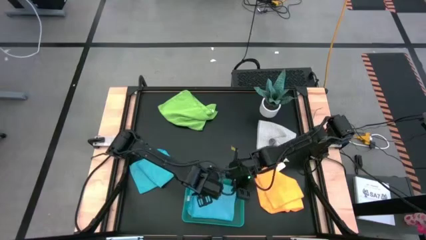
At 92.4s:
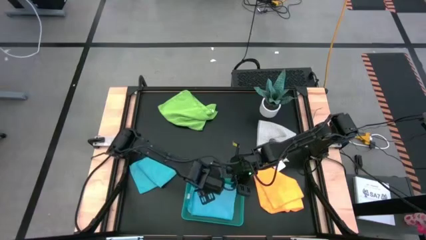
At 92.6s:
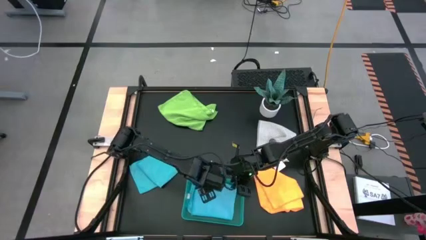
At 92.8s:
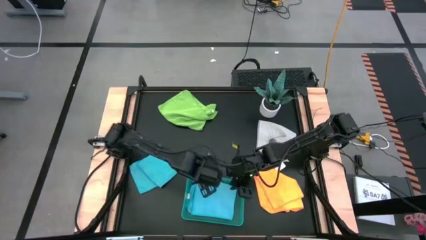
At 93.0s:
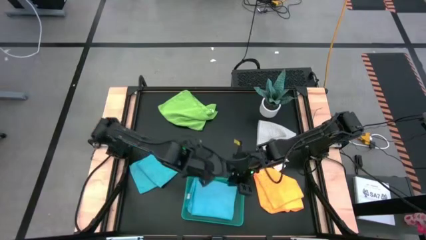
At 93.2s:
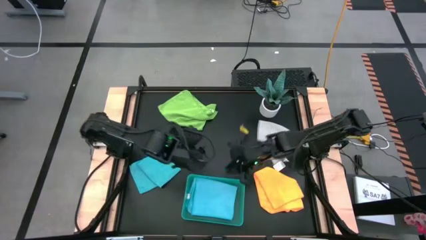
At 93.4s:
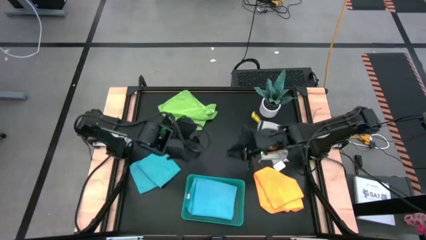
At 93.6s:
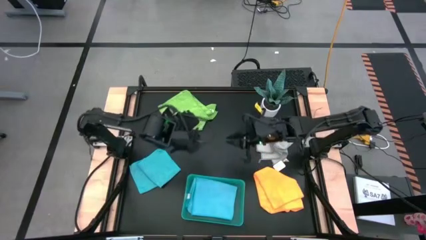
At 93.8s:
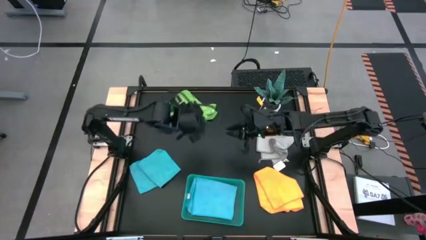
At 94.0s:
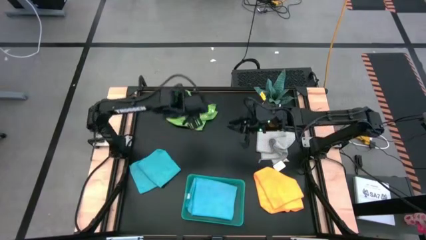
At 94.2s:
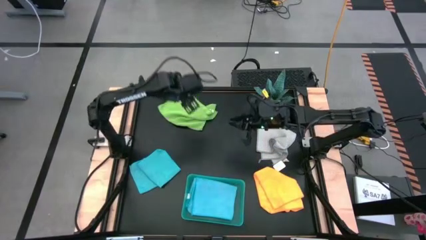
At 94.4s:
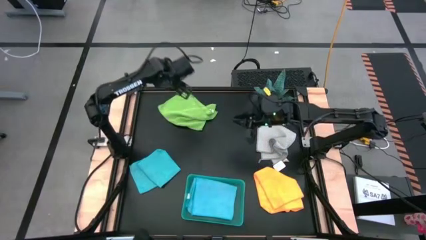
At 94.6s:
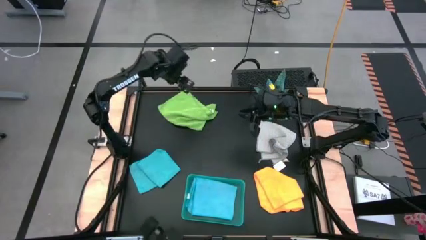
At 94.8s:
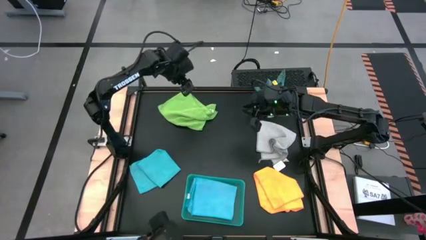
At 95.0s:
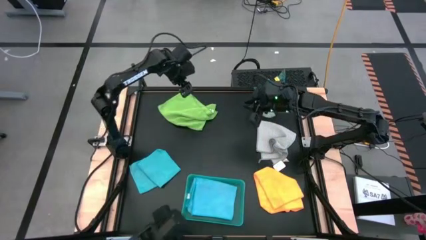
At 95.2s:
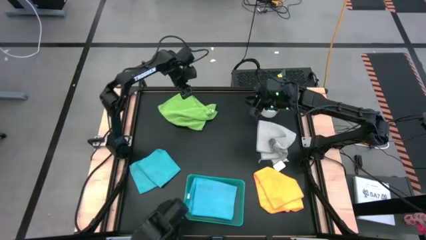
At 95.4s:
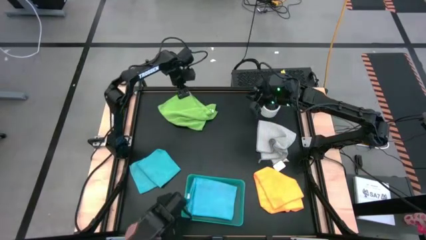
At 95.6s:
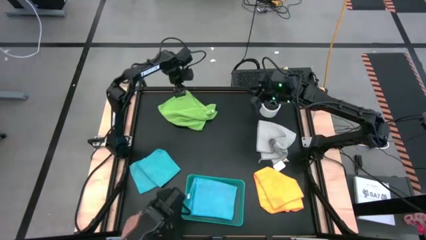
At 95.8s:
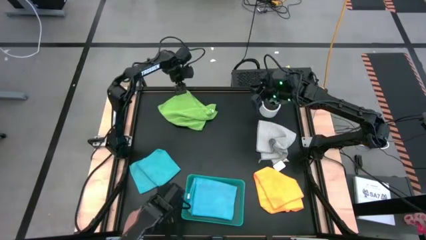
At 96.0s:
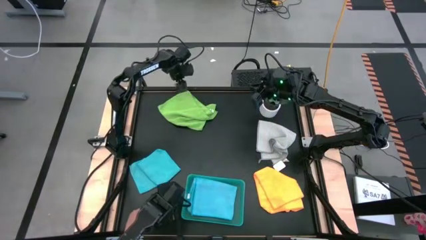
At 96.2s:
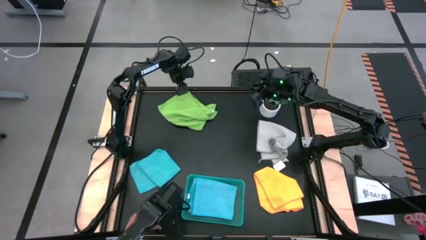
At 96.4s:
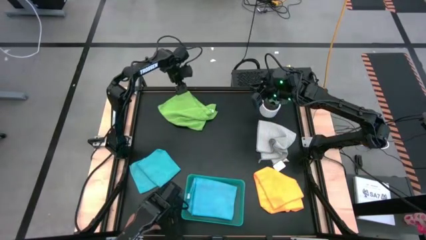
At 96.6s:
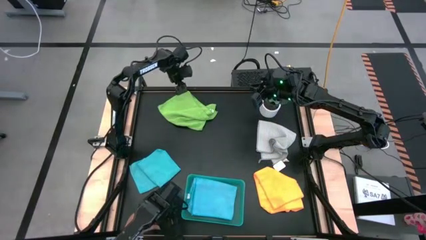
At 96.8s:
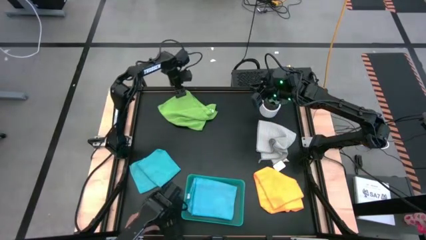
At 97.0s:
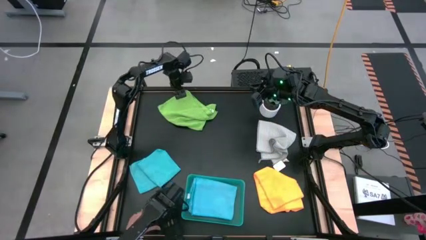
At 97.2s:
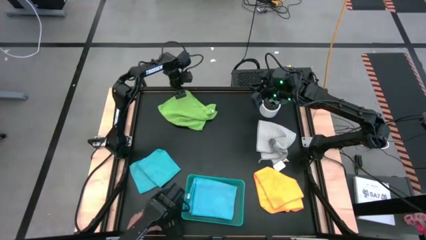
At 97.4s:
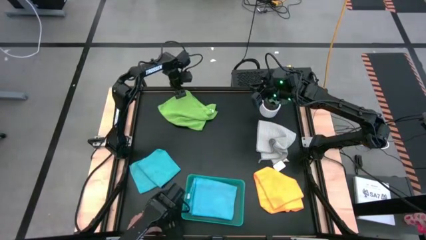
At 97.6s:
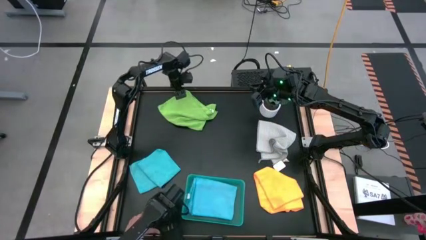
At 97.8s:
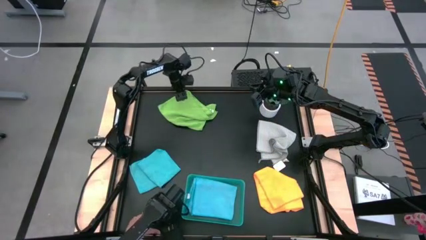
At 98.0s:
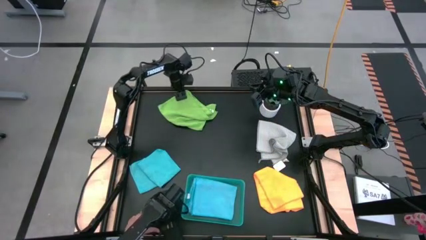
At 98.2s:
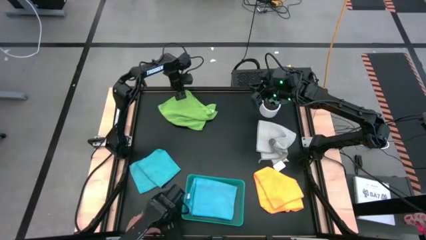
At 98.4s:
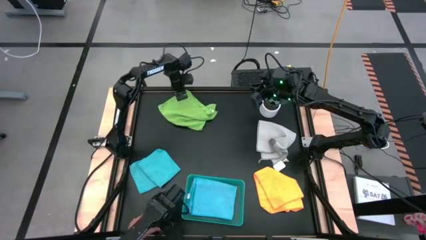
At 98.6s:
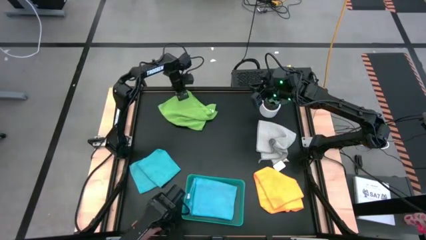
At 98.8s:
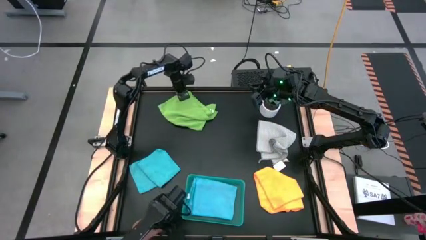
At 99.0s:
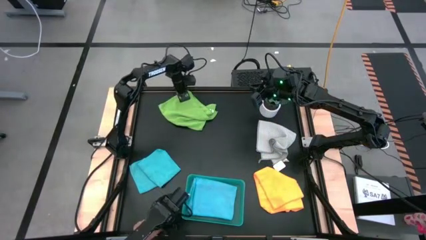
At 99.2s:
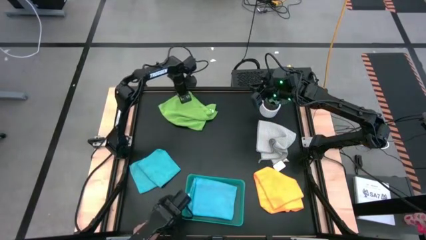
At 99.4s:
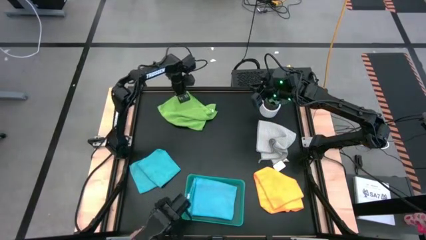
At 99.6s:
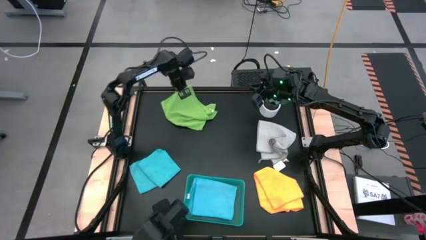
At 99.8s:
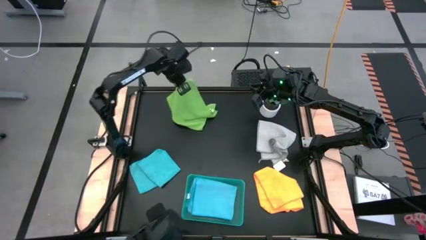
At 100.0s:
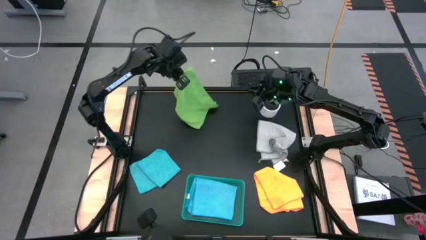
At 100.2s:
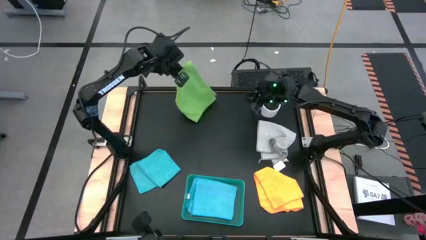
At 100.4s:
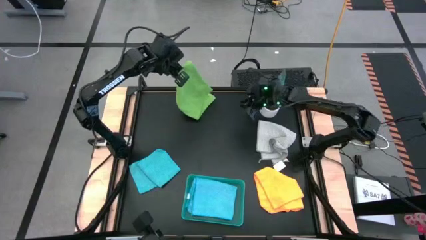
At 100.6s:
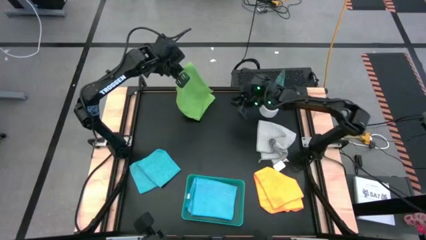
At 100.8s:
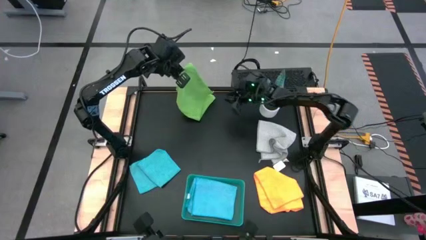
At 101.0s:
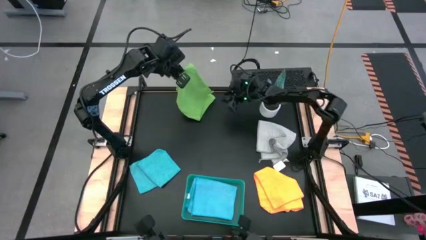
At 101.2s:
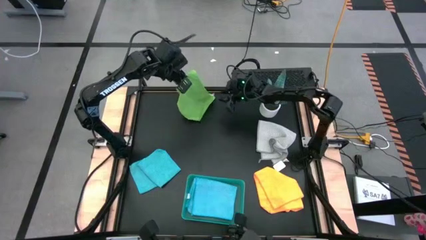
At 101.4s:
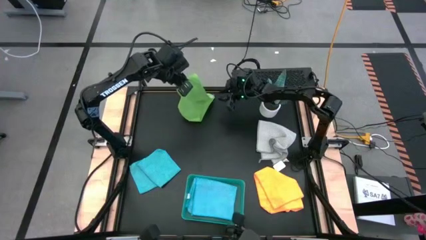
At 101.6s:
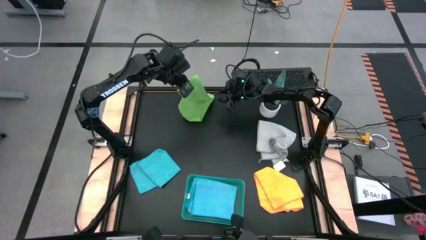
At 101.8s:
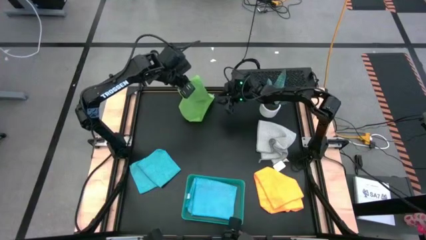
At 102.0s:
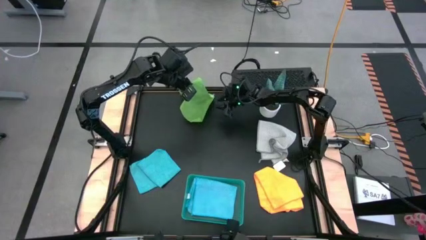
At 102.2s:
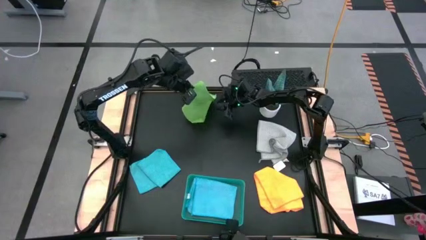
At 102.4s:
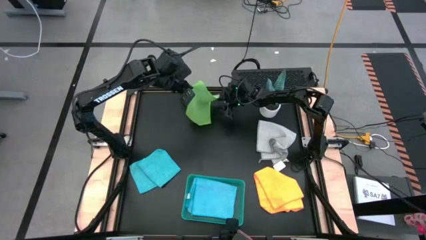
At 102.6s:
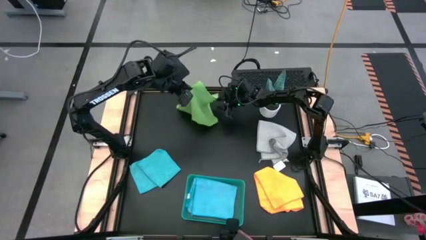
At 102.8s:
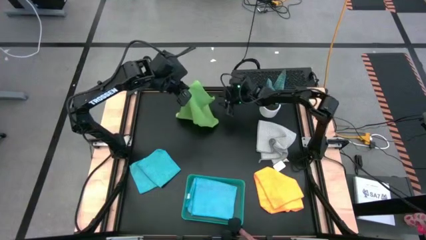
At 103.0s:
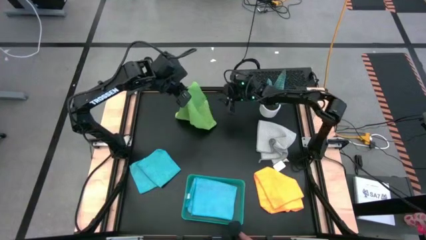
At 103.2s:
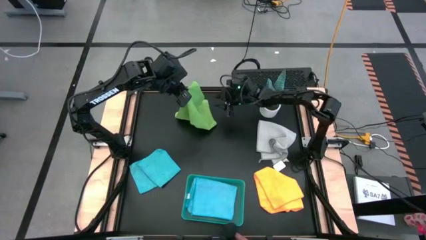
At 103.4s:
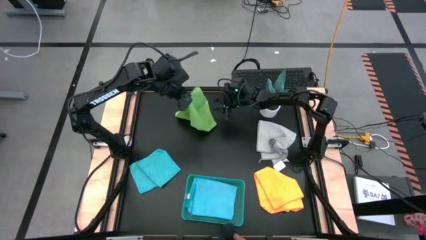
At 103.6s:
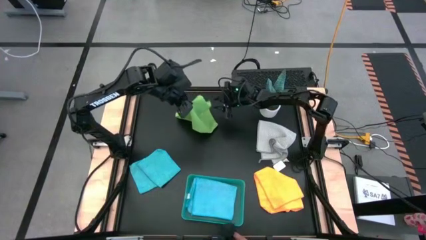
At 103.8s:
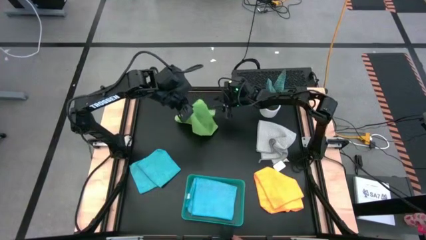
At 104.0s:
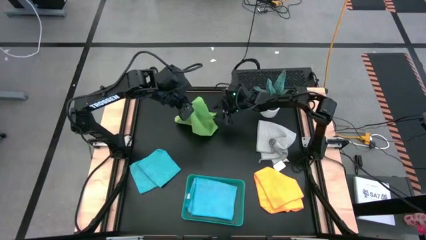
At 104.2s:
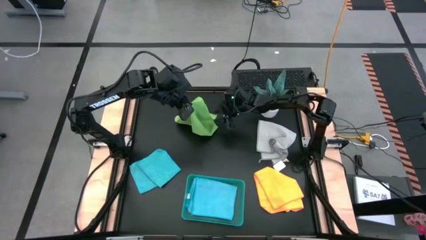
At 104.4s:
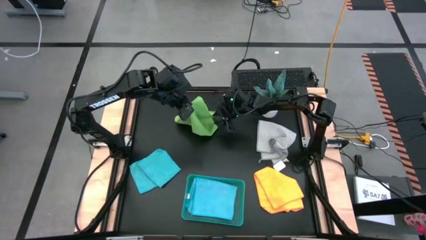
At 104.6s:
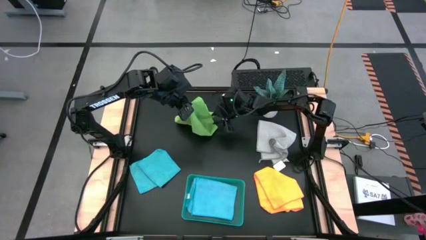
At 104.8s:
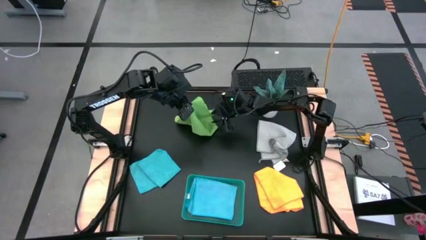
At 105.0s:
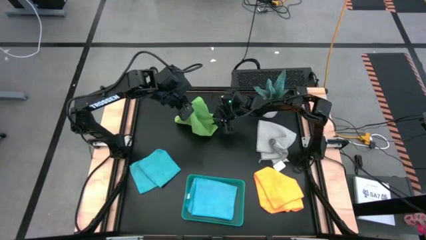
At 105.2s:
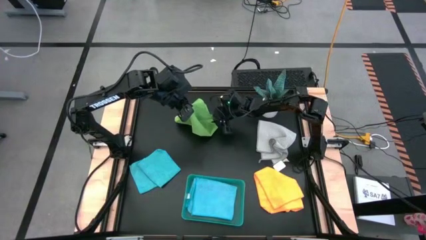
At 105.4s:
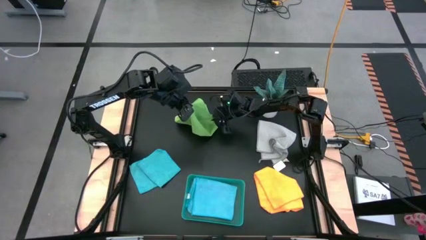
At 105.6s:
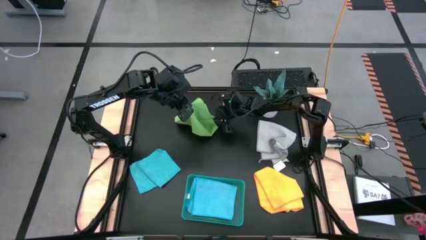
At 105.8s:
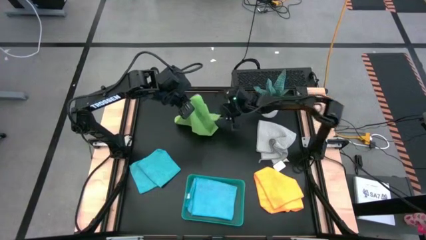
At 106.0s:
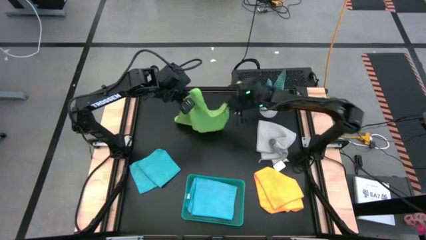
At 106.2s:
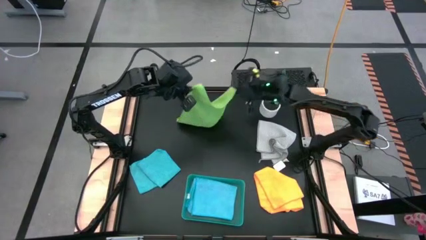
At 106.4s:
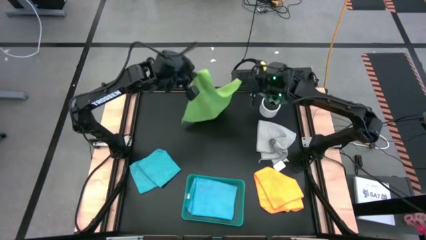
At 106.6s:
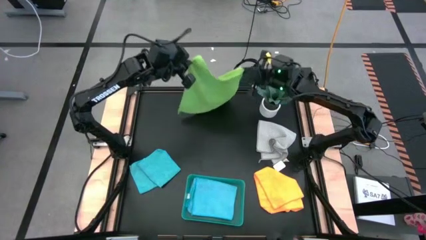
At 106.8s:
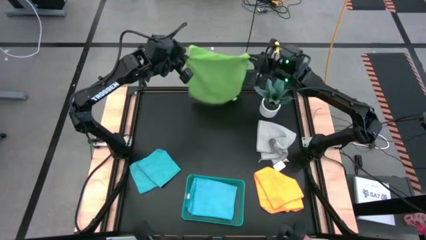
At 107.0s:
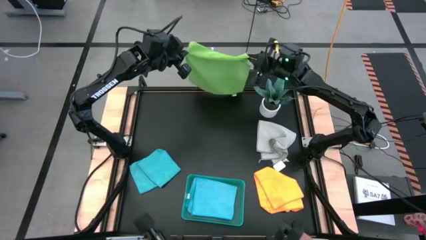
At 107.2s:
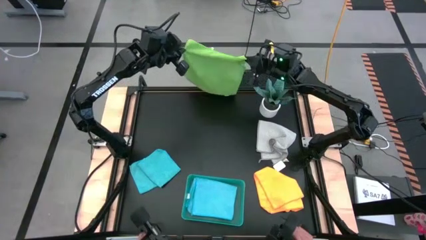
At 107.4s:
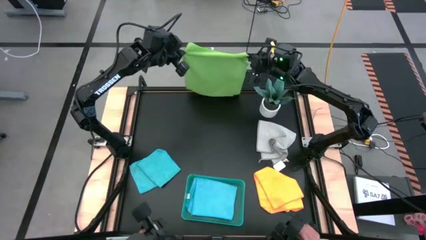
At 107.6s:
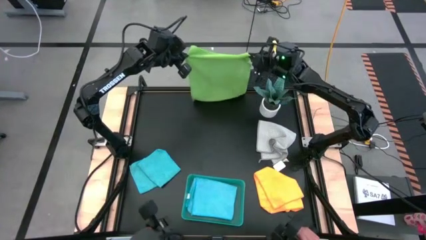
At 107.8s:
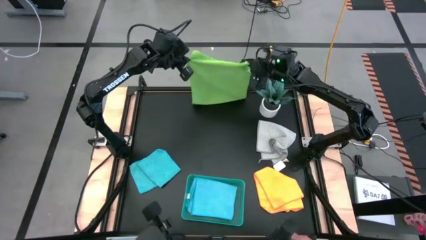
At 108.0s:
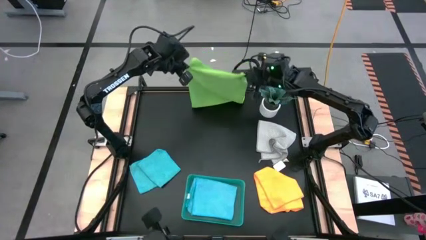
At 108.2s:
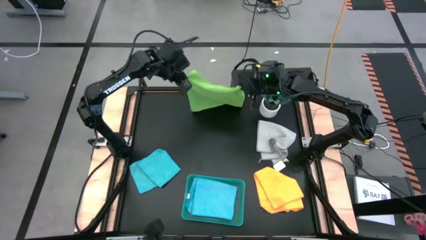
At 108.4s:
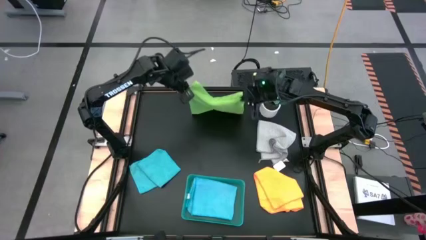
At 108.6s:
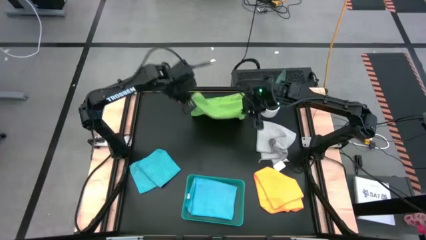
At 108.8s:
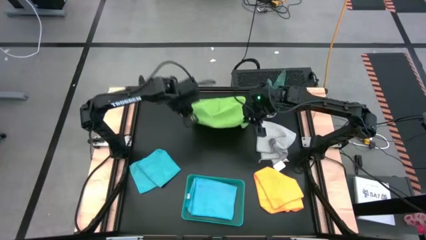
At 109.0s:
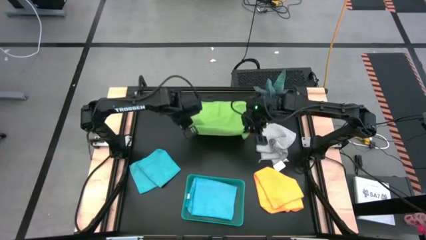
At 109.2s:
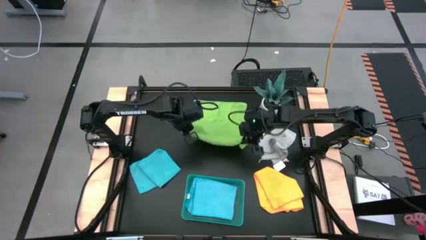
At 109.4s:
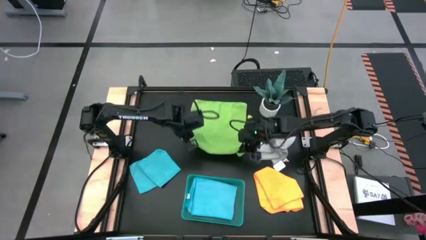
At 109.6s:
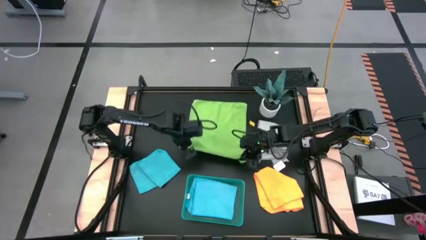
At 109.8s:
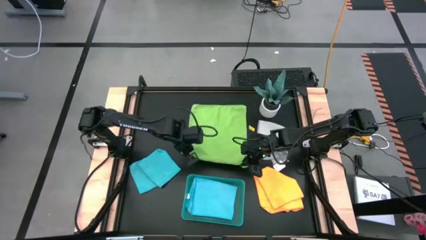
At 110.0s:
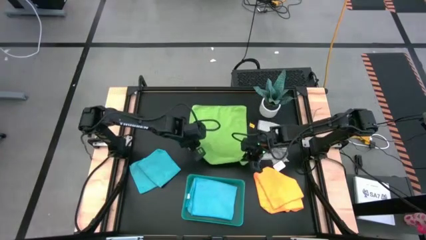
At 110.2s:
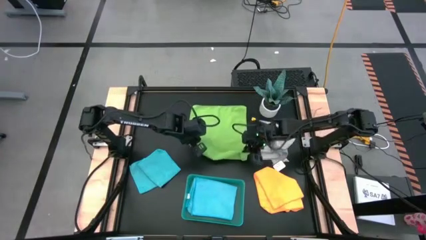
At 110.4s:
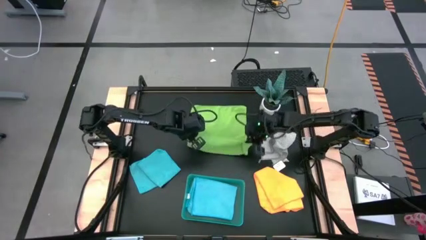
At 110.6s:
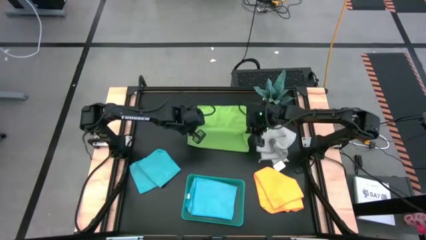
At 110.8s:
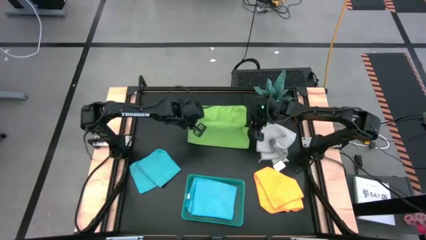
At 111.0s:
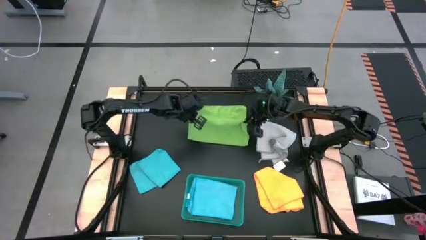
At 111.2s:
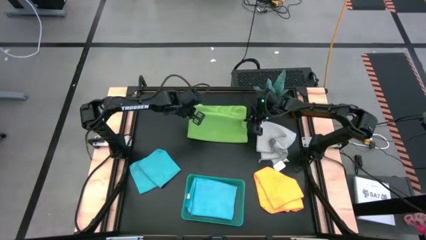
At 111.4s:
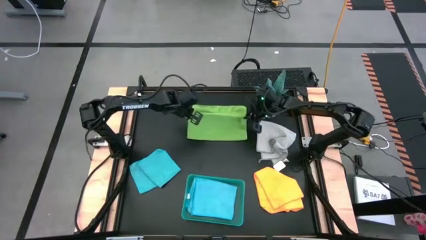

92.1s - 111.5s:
Task: Fold microfiber towels
Fold the green microfiber cloth into the bin
